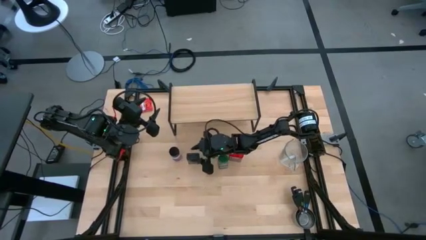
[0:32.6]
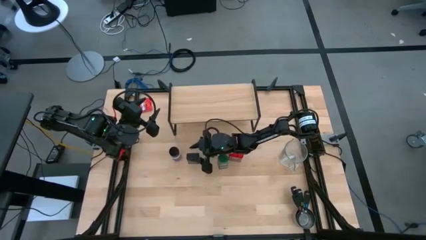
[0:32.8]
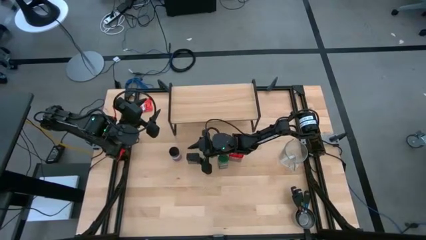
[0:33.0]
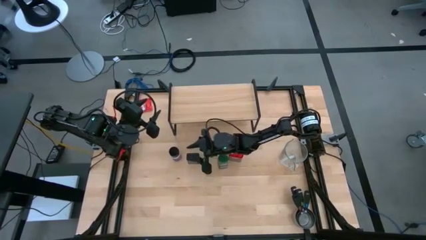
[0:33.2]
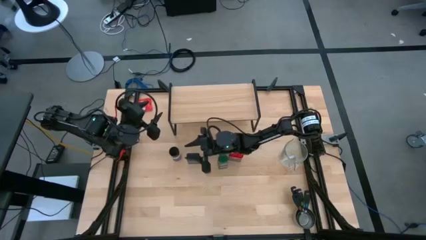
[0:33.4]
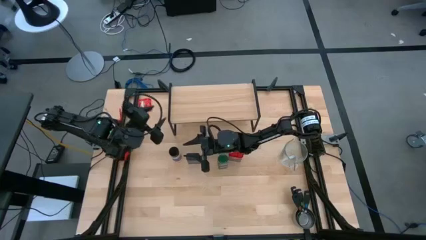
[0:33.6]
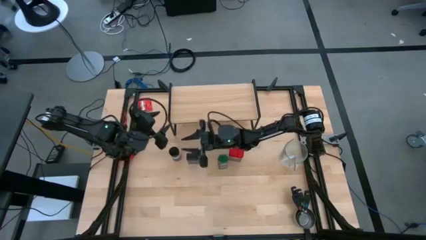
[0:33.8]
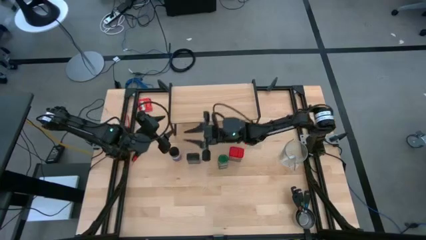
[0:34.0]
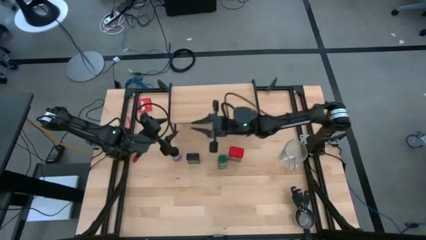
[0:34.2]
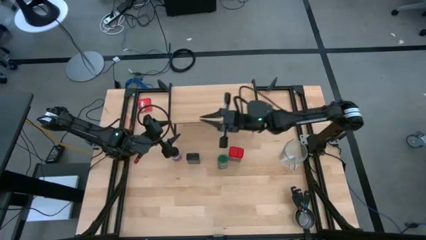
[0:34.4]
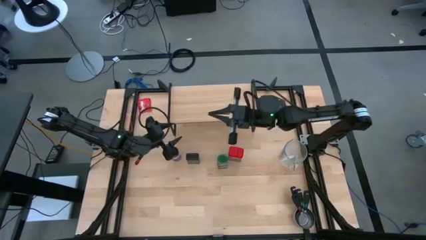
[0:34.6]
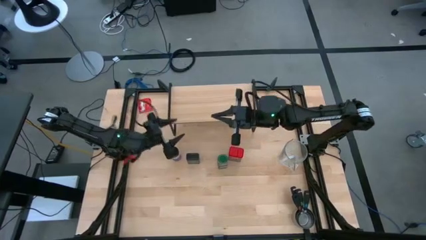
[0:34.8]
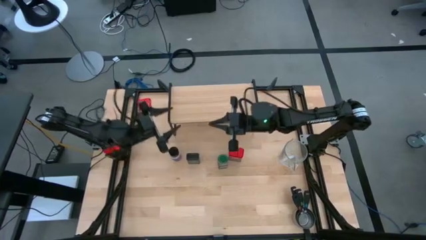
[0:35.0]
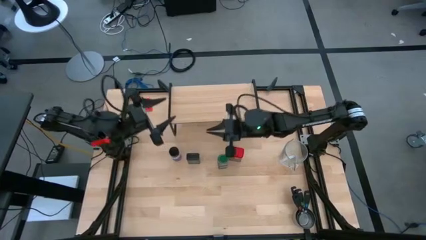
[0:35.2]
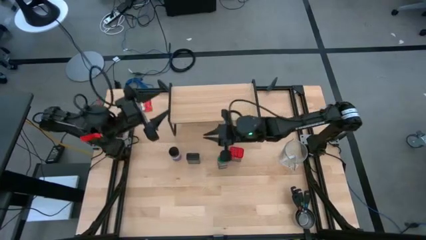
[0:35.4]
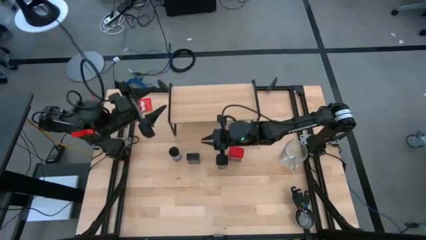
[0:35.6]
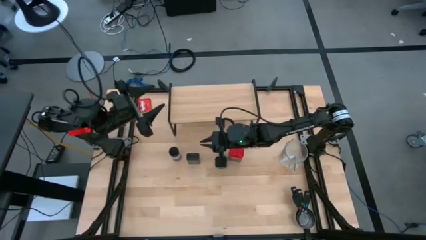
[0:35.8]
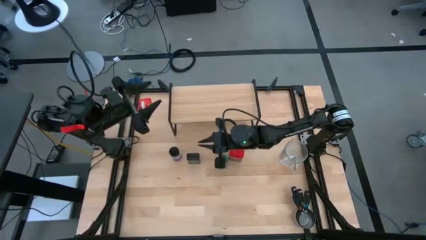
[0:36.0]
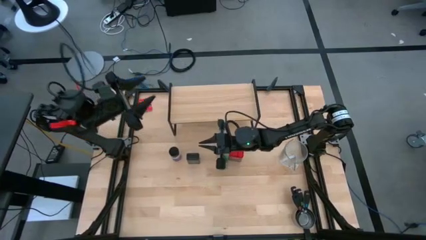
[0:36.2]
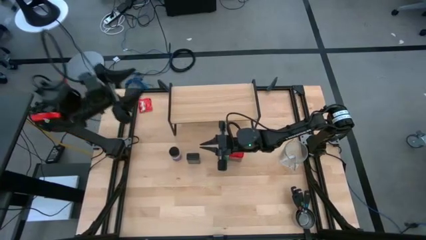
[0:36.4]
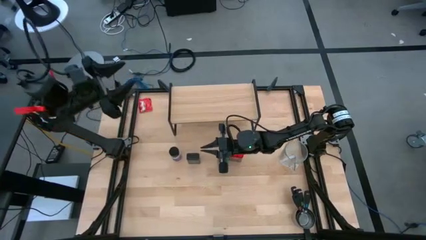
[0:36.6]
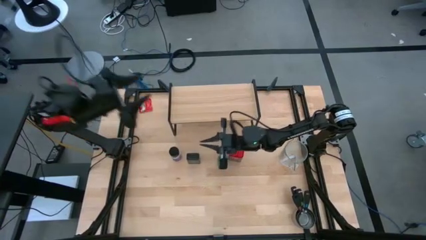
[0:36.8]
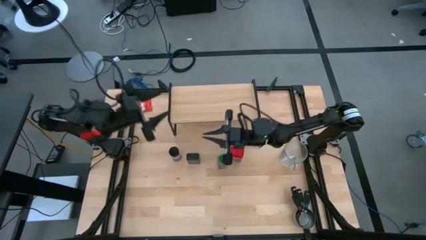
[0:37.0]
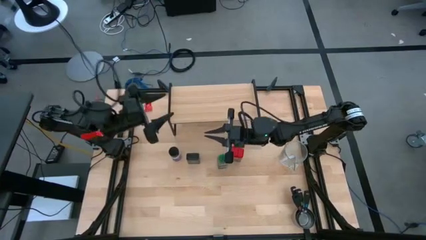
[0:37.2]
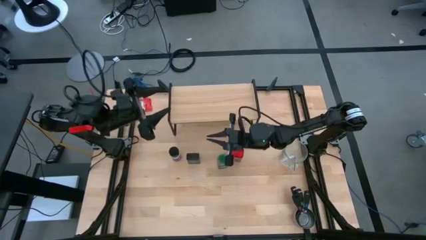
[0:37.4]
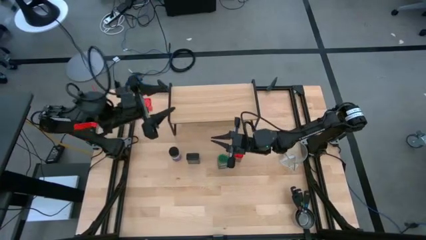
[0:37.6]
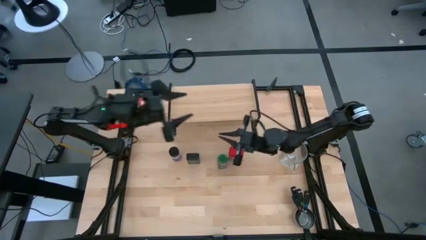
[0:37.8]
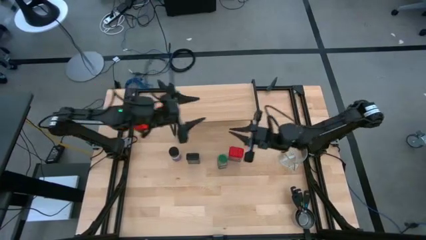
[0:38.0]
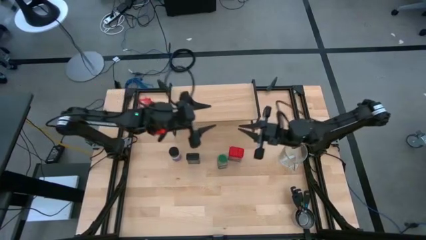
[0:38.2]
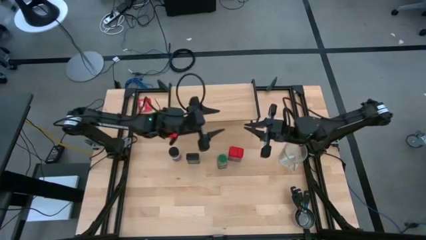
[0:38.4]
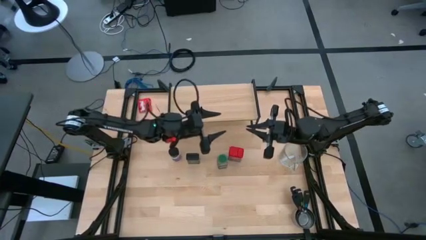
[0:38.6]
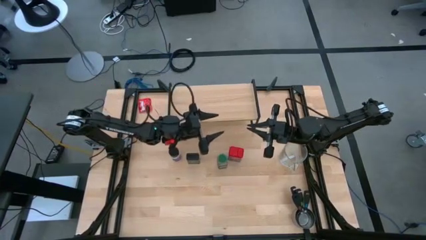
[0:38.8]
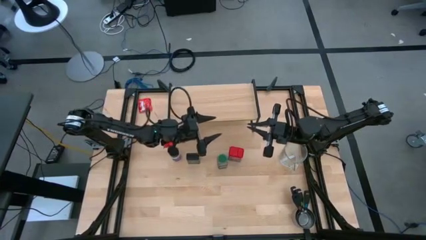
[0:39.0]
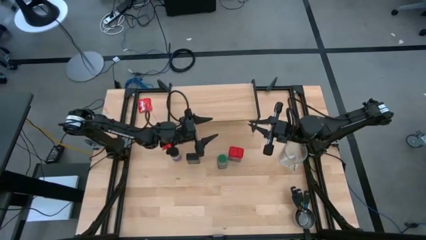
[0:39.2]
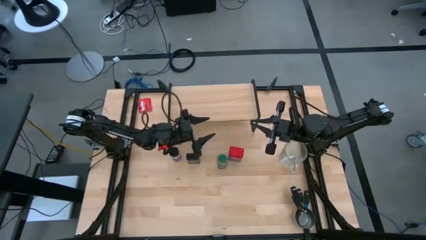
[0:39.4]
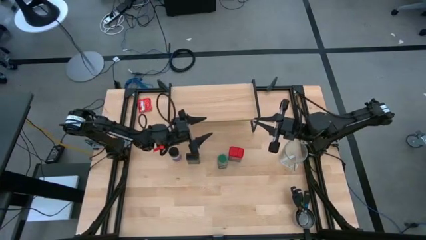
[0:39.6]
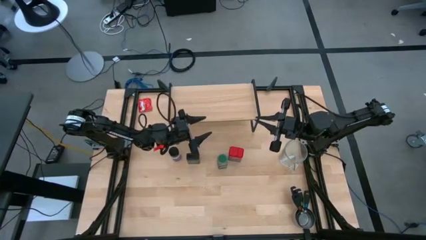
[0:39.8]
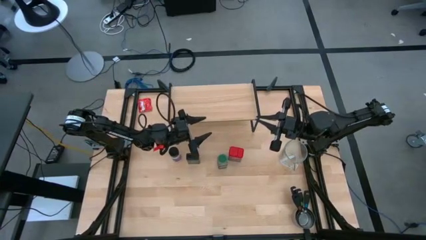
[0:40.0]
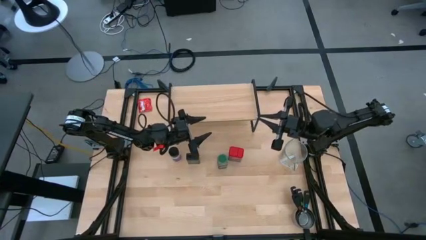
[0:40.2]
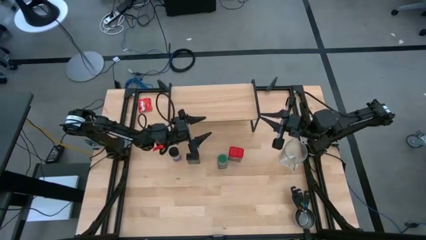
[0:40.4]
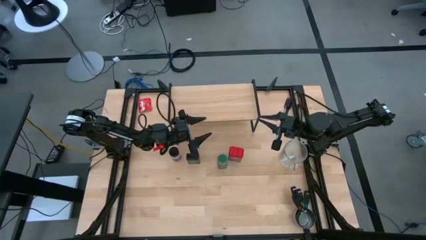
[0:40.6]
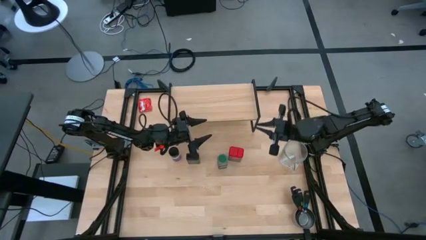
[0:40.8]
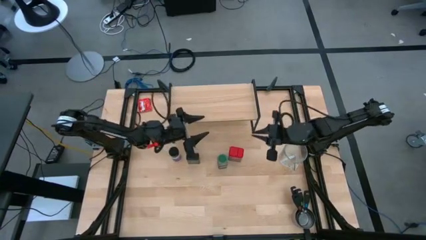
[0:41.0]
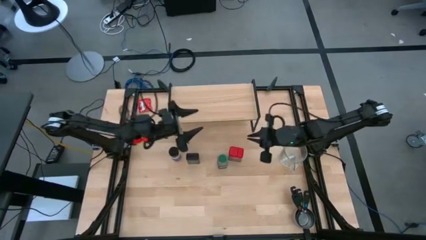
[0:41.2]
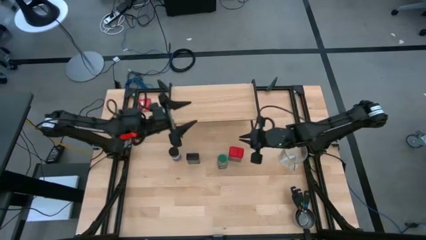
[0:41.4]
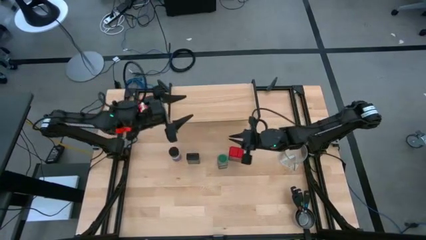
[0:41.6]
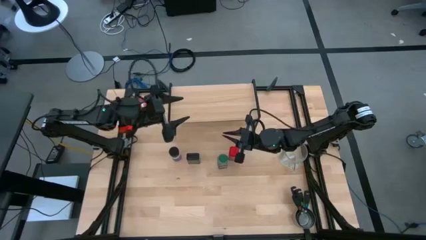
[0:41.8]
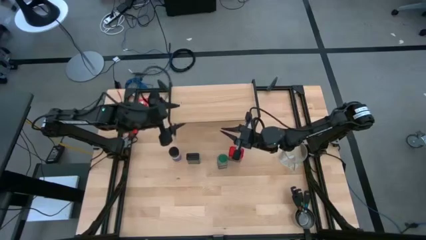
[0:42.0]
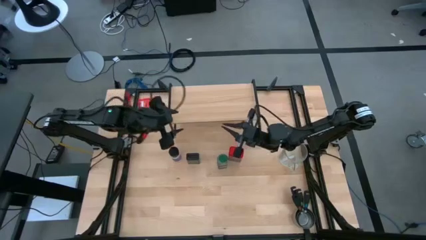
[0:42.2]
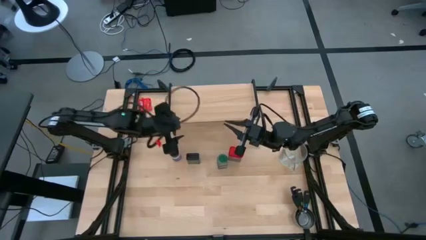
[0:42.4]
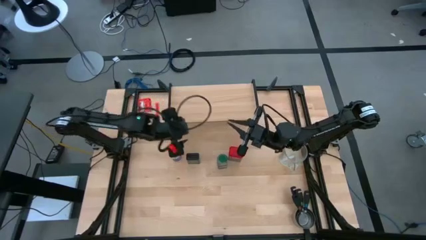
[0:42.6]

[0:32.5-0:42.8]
Task: Shelf spices
Put the black seasoning can on the shelf
